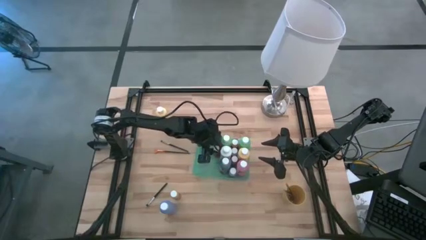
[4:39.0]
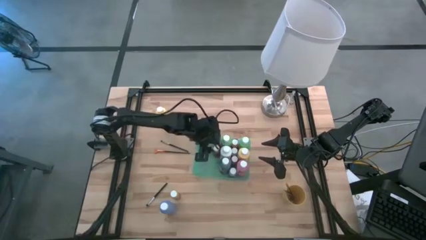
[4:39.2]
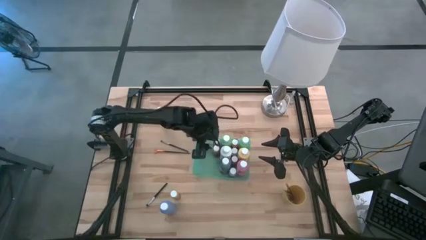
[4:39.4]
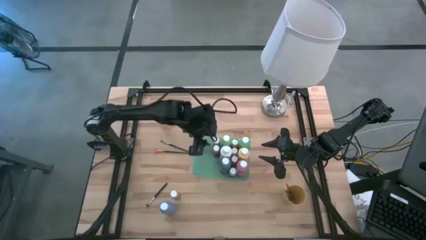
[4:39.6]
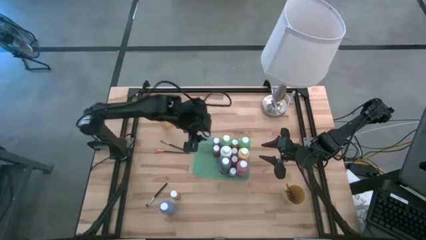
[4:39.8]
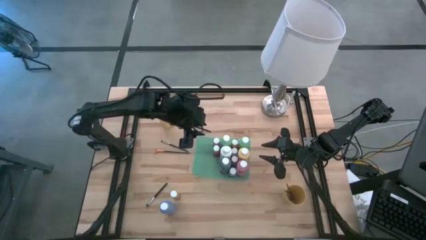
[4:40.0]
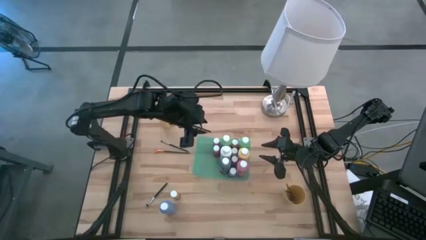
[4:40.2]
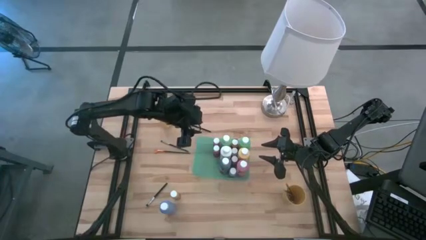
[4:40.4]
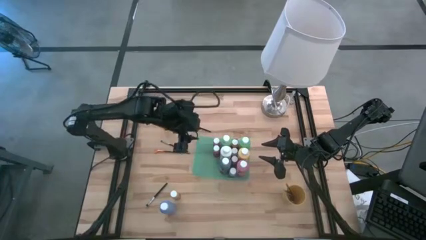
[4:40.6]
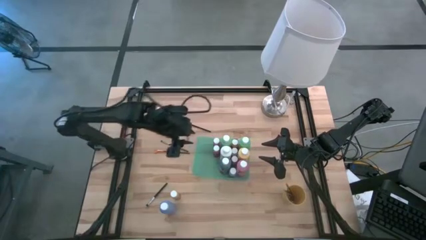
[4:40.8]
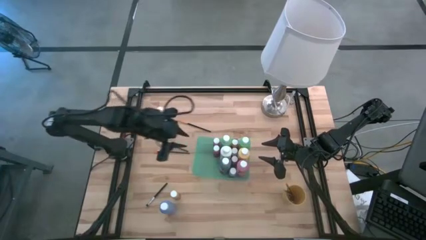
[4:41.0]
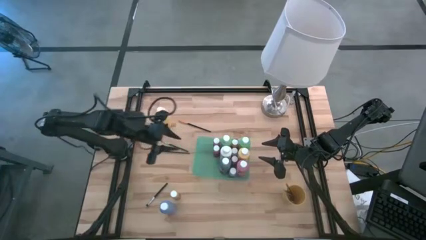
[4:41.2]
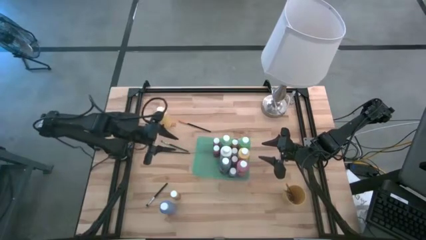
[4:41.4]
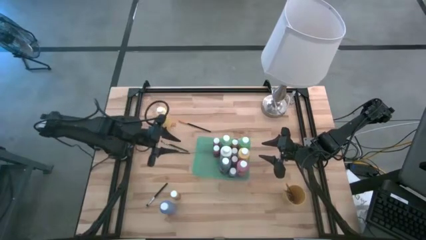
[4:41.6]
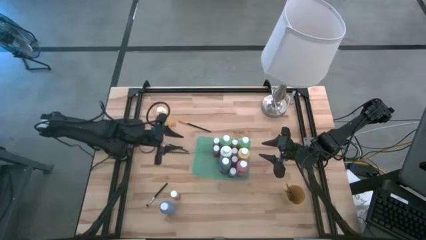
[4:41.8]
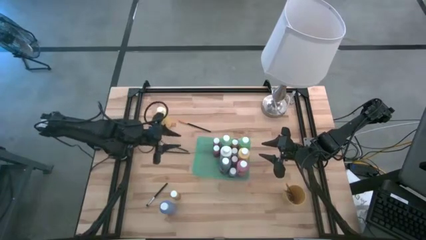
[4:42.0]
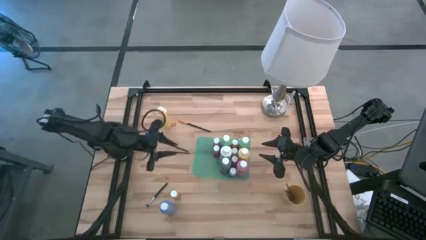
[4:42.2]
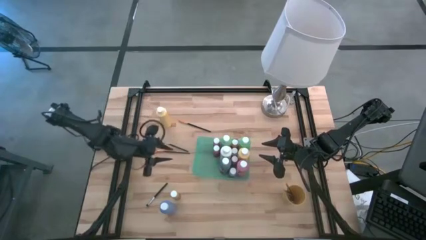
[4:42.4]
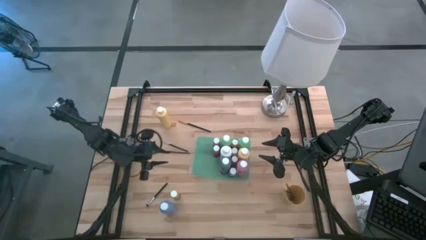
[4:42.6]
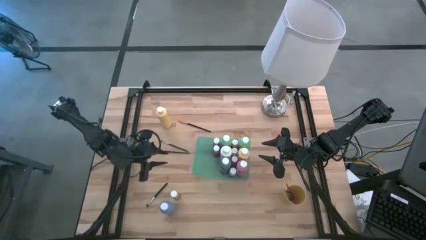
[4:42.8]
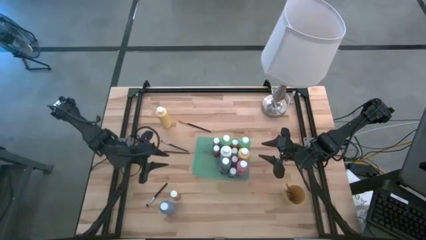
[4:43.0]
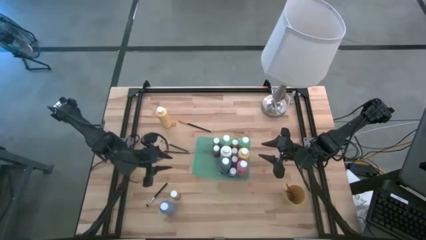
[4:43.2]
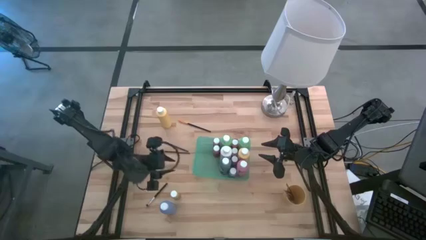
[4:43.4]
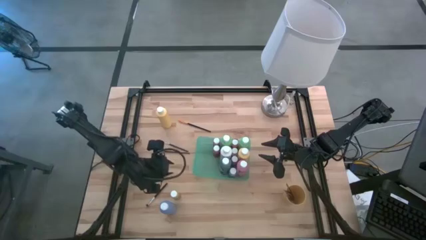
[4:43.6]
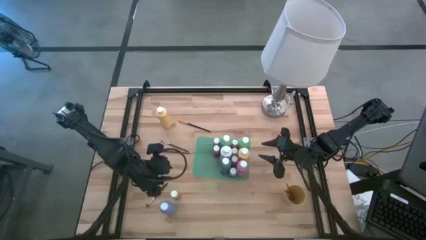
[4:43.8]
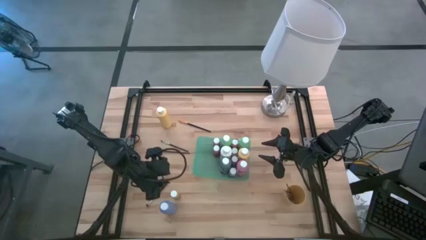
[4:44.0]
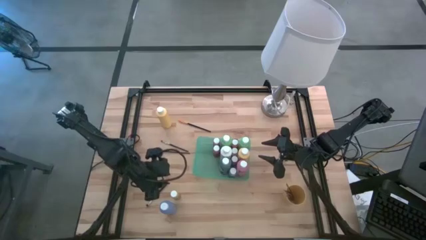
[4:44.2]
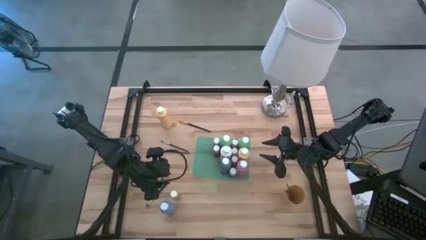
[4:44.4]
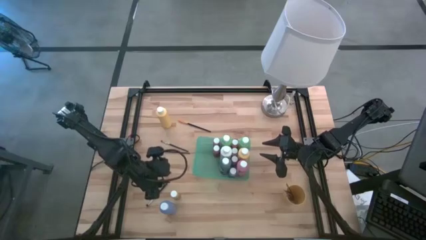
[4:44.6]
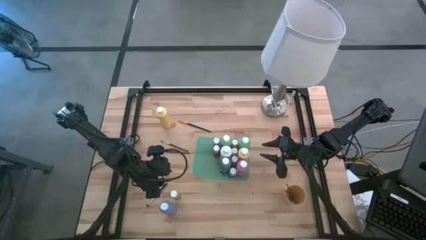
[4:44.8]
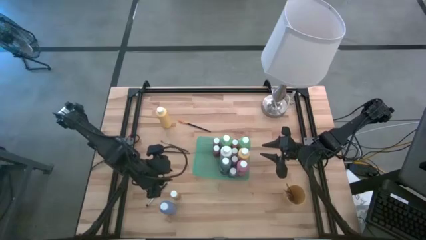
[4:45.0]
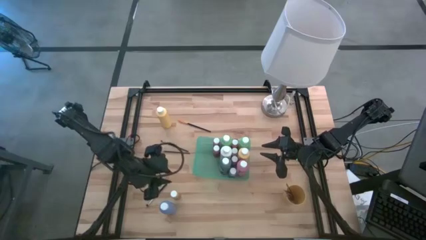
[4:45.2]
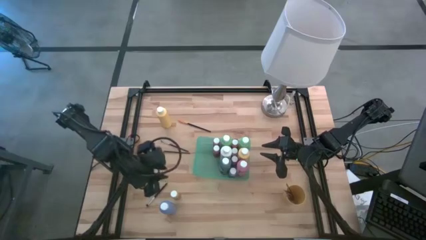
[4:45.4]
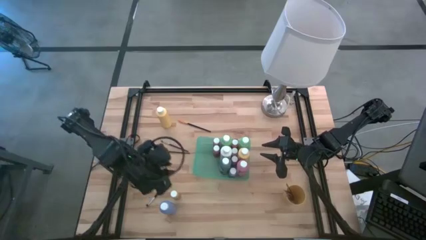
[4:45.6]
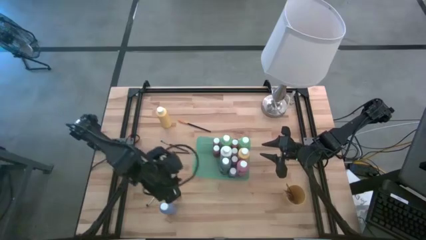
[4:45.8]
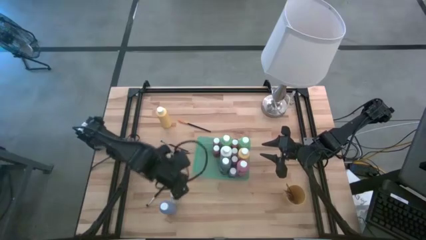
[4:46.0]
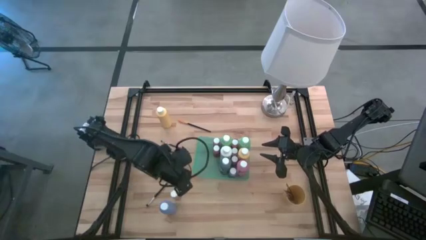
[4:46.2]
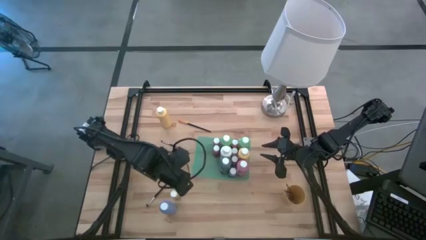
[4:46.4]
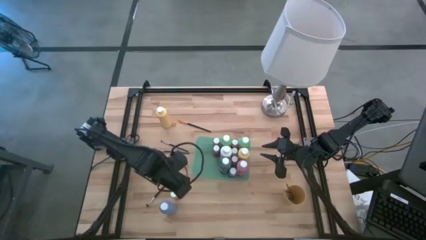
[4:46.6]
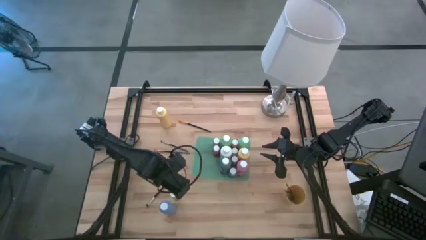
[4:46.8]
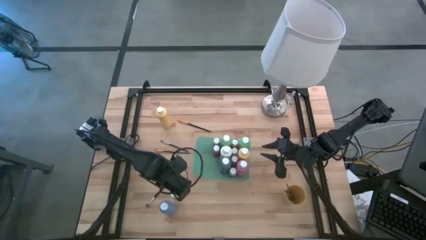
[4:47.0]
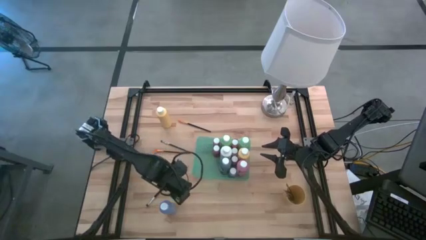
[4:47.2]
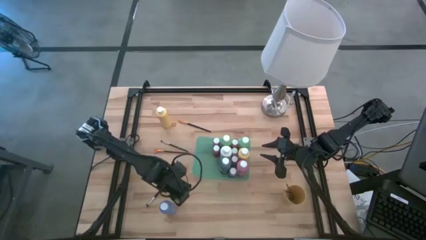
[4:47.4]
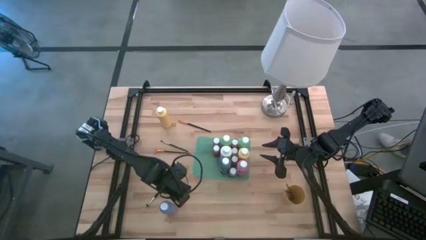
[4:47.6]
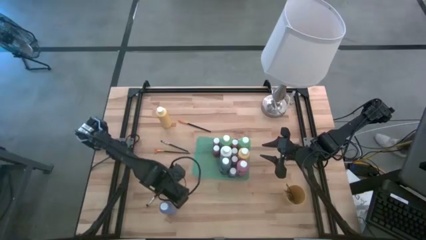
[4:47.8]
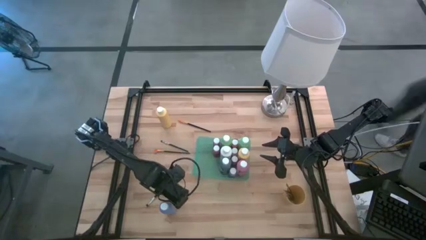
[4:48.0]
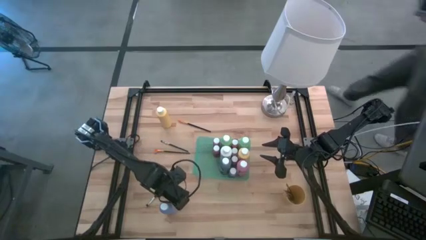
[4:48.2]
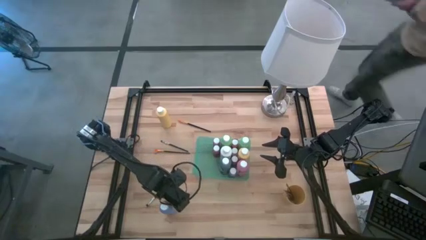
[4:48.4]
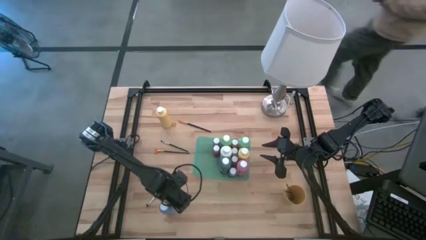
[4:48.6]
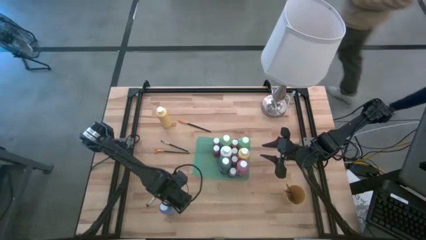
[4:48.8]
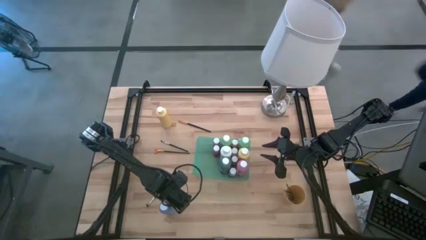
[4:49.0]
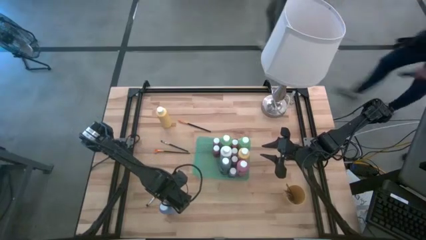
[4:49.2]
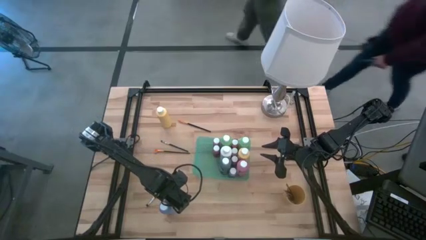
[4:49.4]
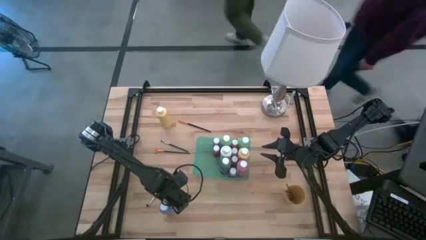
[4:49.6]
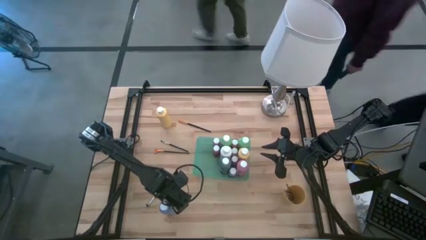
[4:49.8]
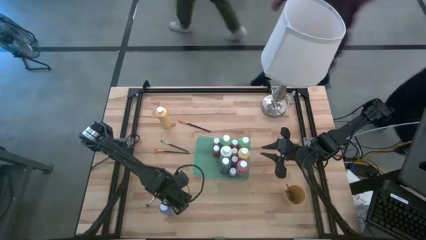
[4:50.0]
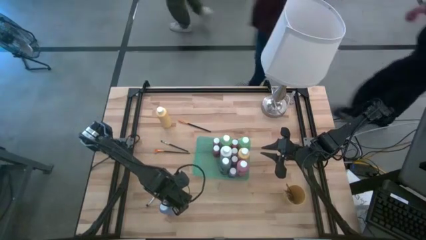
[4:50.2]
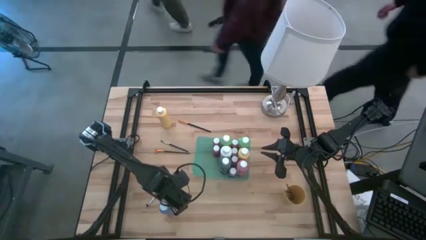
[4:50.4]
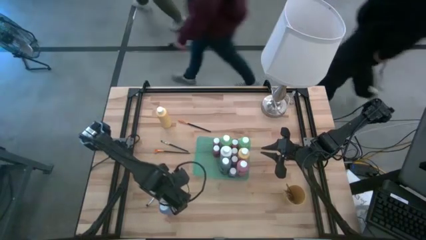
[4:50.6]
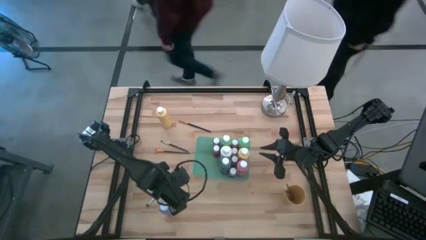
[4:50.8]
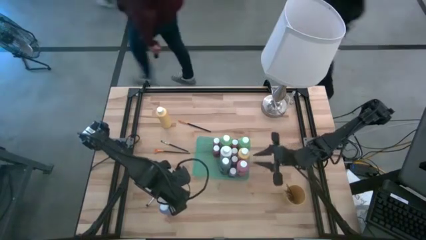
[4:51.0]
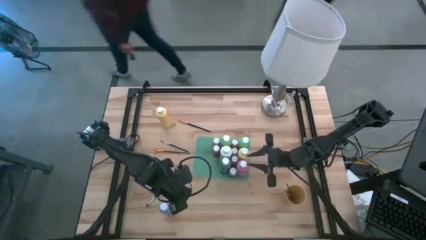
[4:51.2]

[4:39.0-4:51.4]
Task: Pick & Place Paint Supplies
Put the dark yellow paint bottle into the green bin
